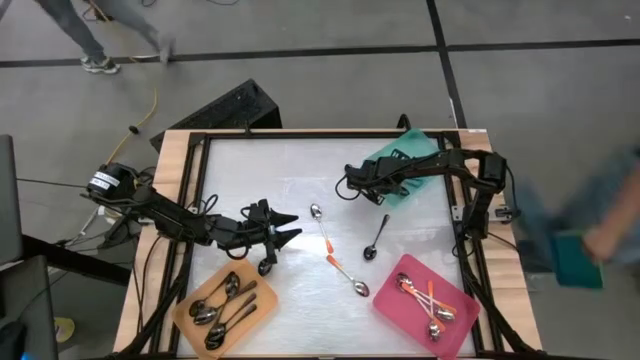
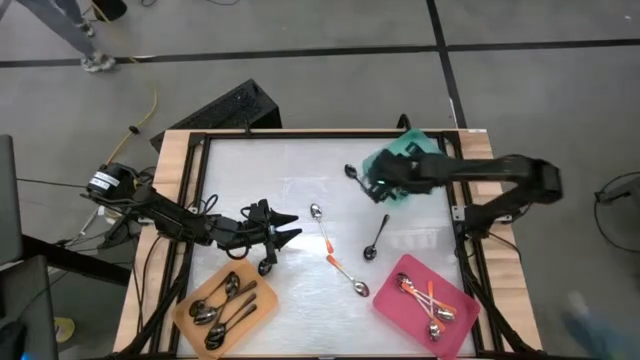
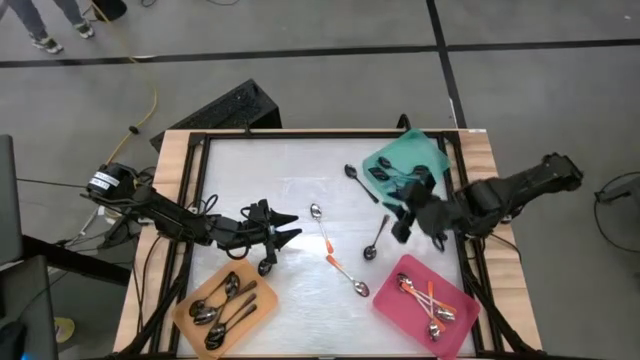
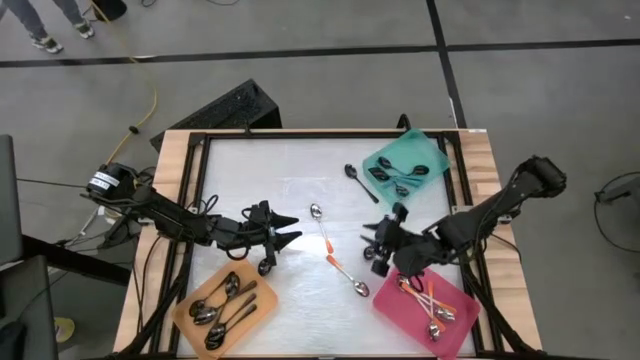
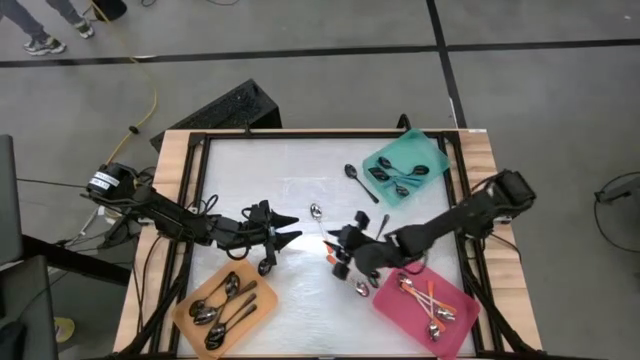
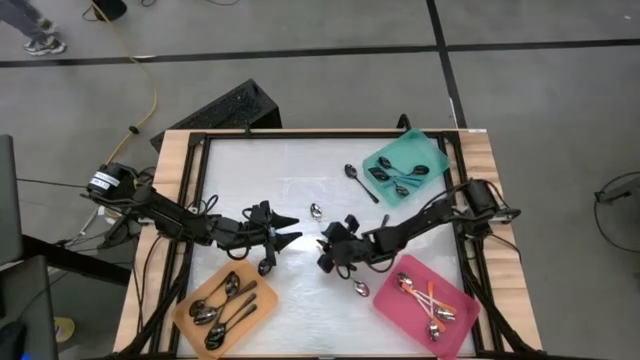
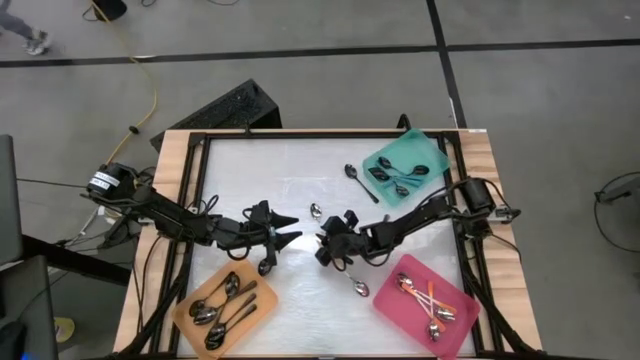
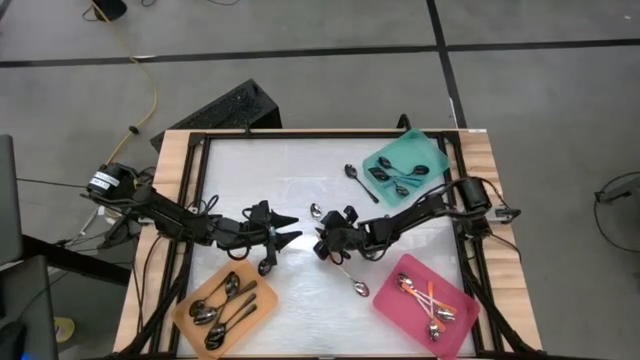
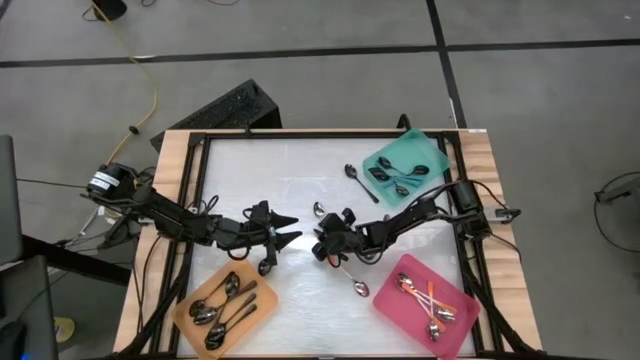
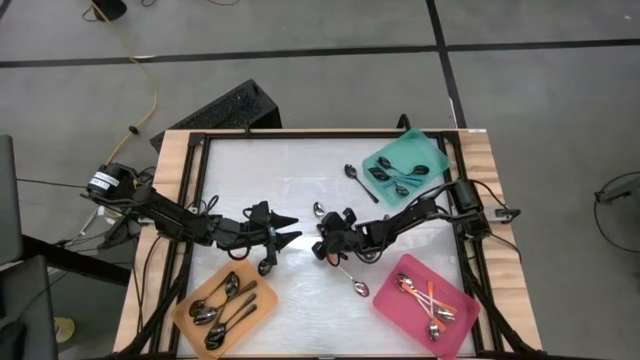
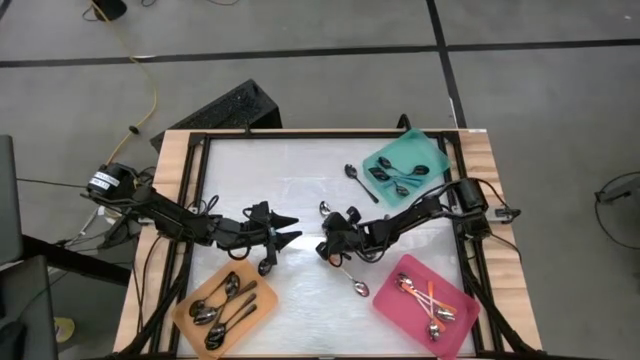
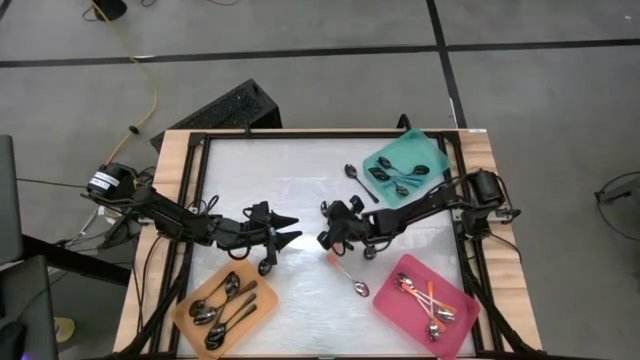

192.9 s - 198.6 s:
Task: Sort silverware by color (type)
Put the orange spoon into the red bin

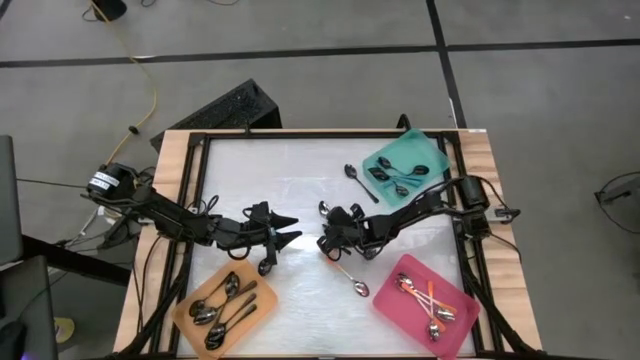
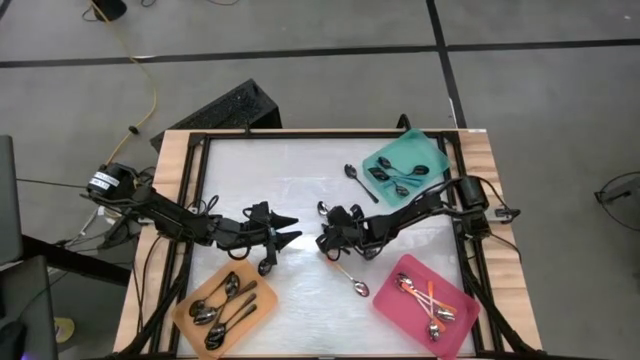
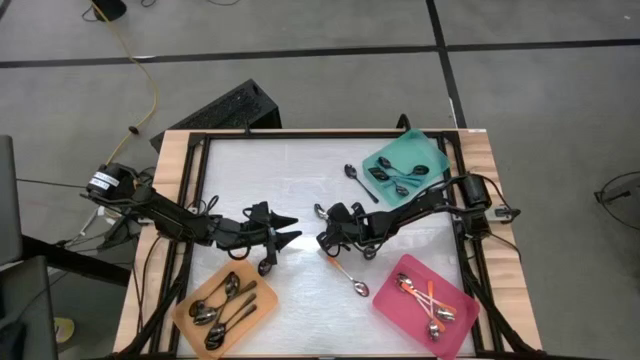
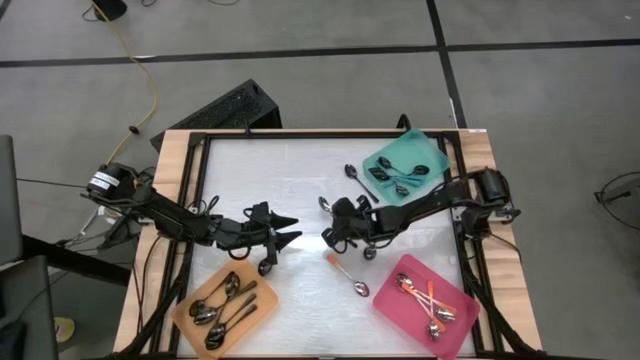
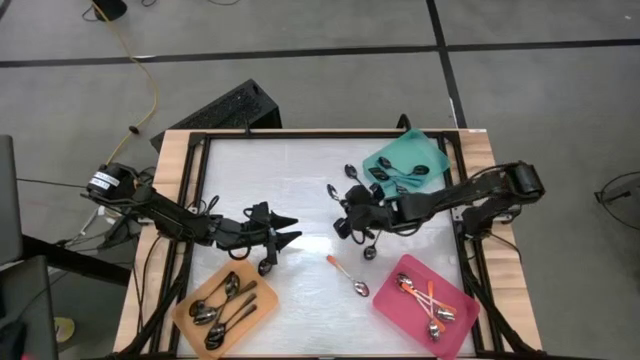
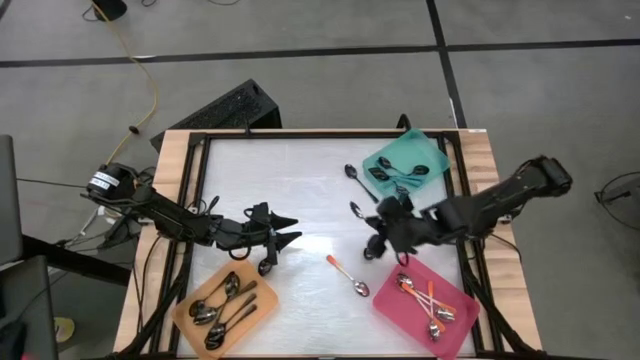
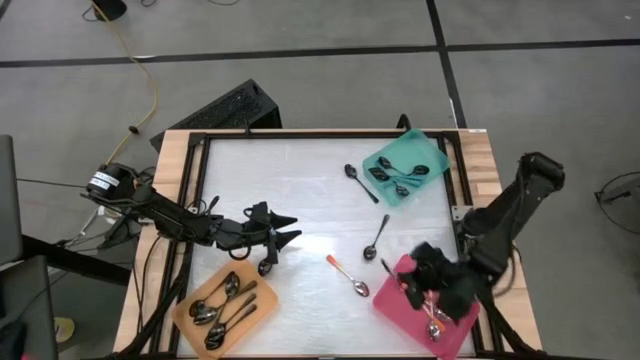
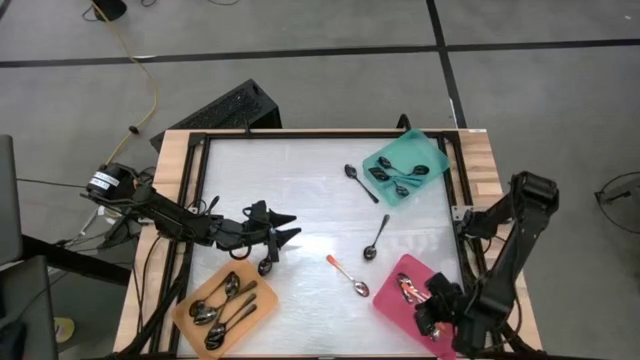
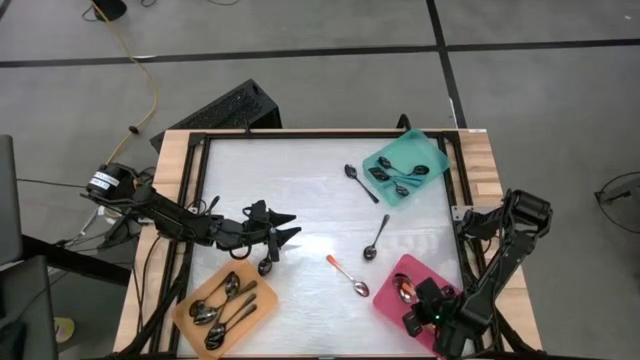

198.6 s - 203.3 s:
Put the orange spoon into the red bin

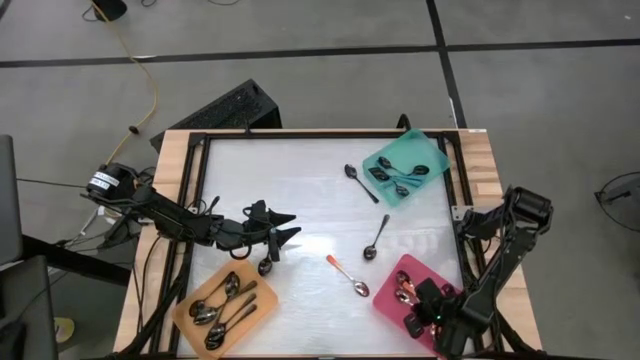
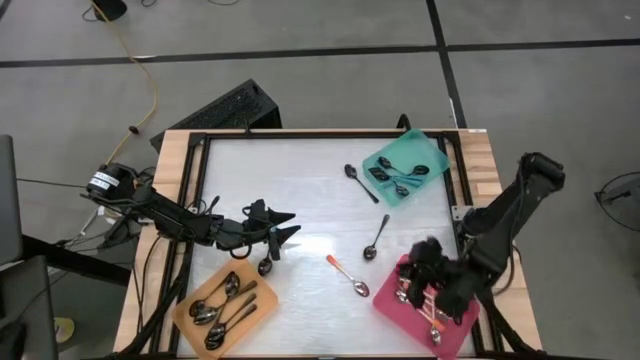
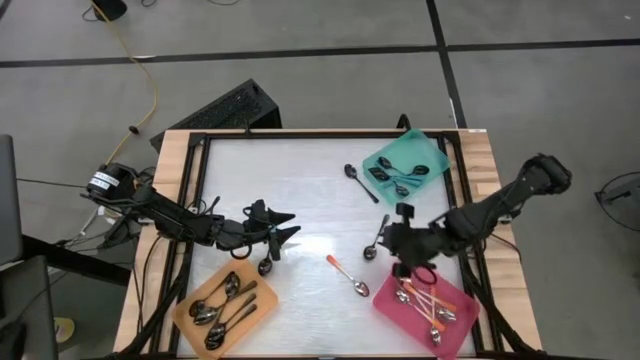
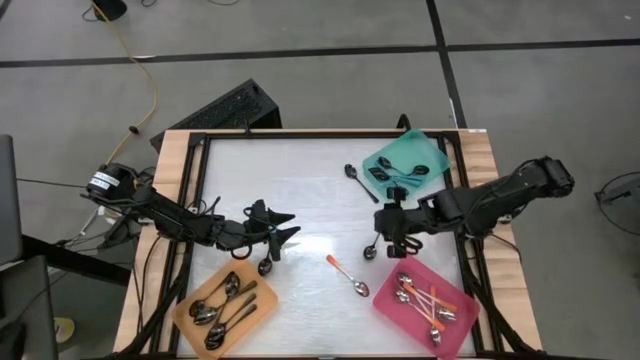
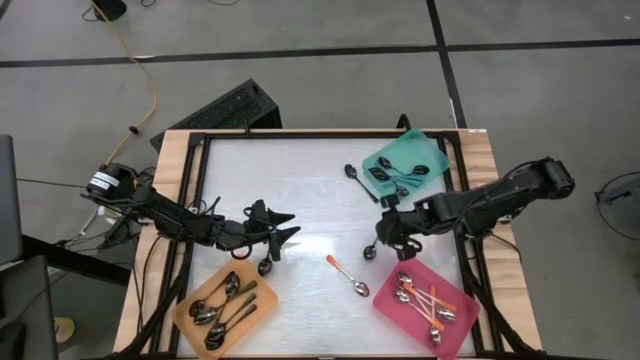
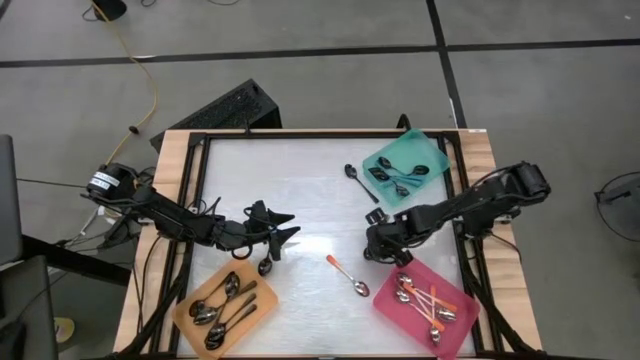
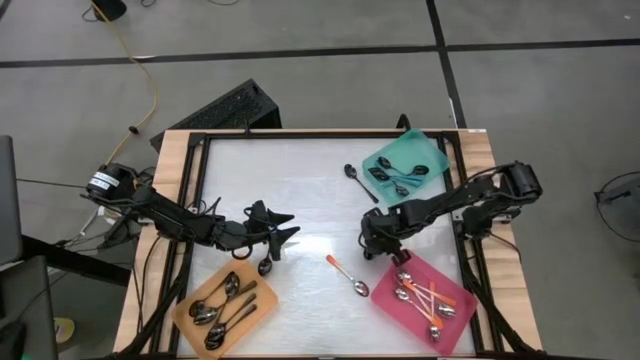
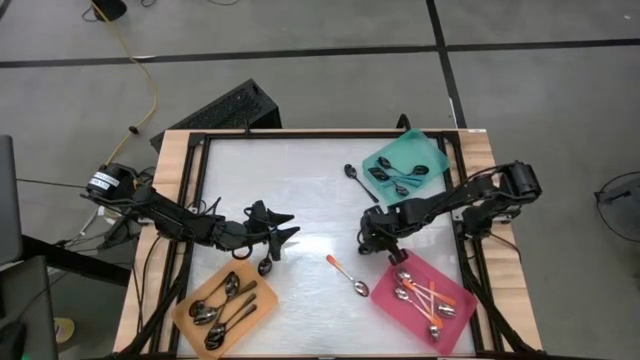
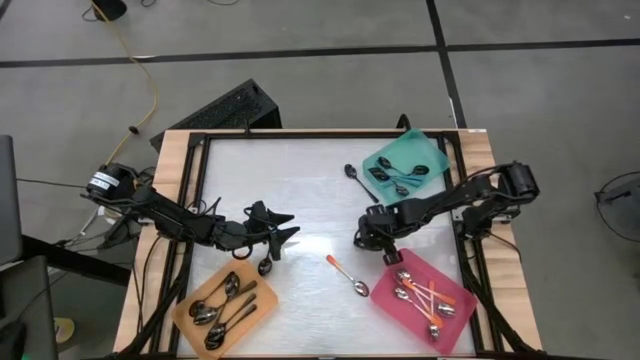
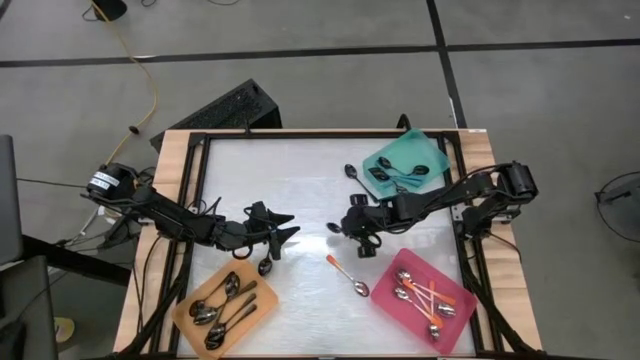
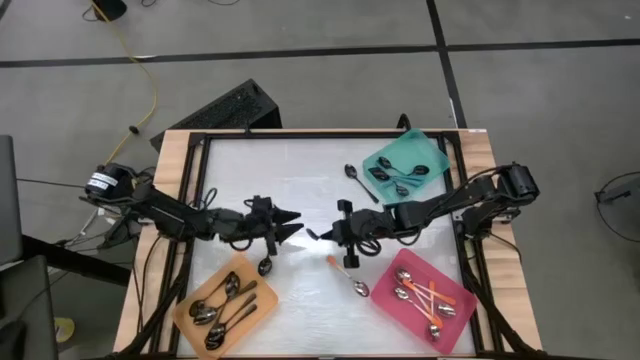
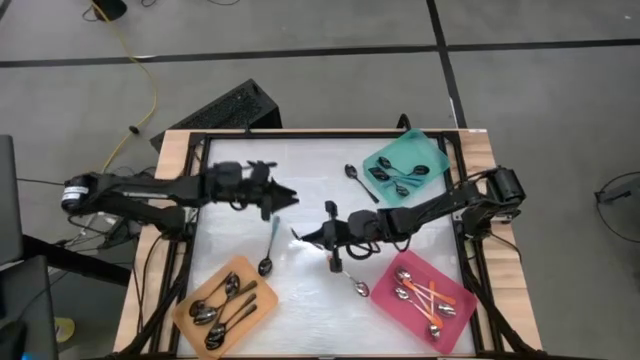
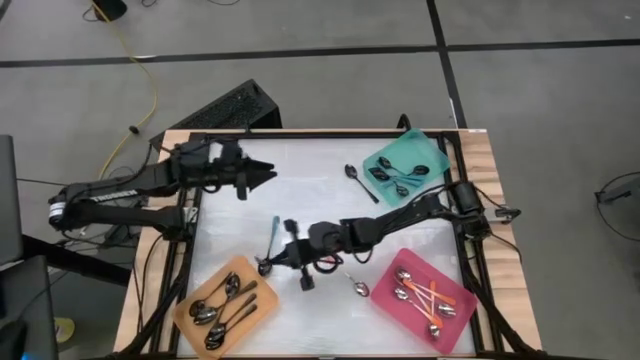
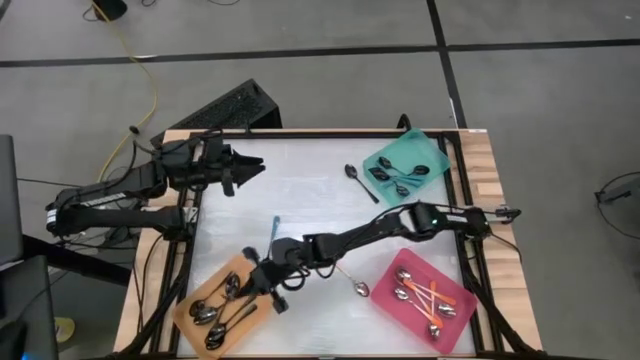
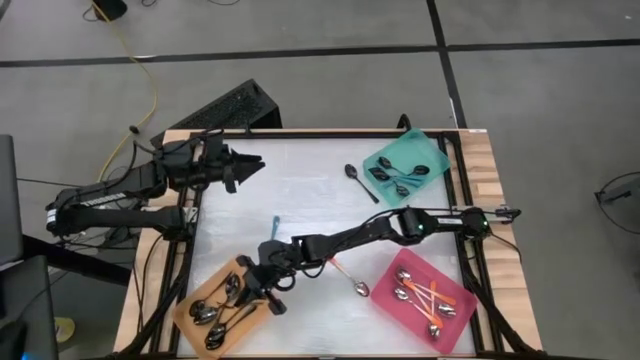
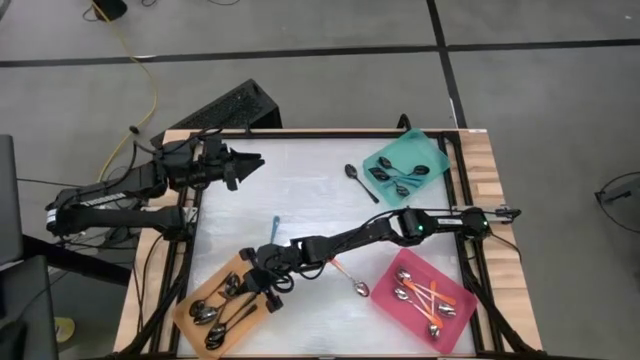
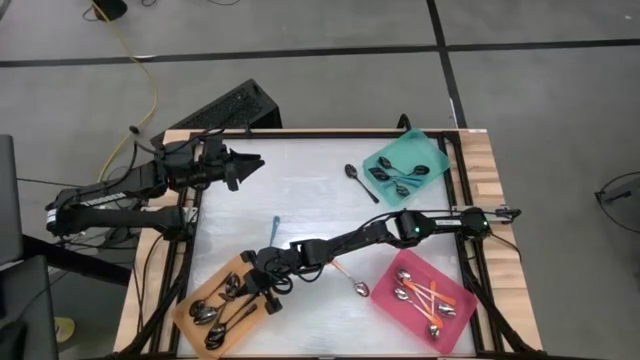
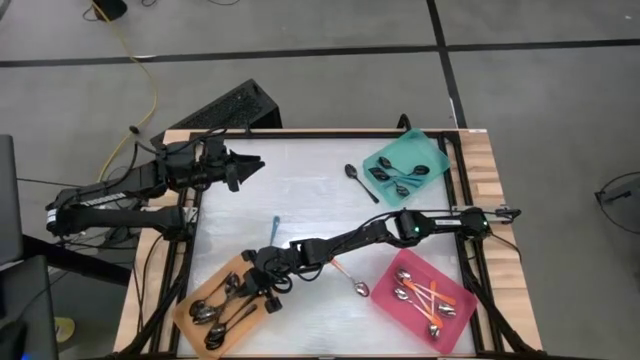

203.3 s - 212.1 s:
Put the black spoon into the orange bin

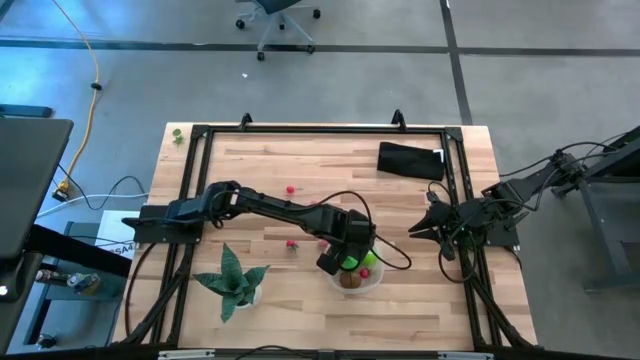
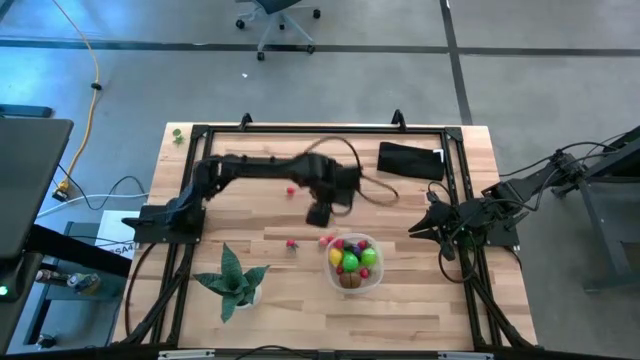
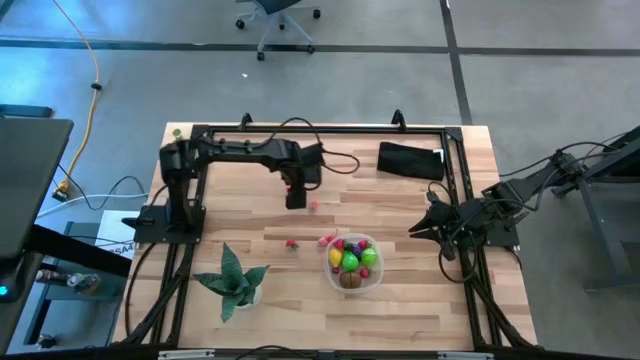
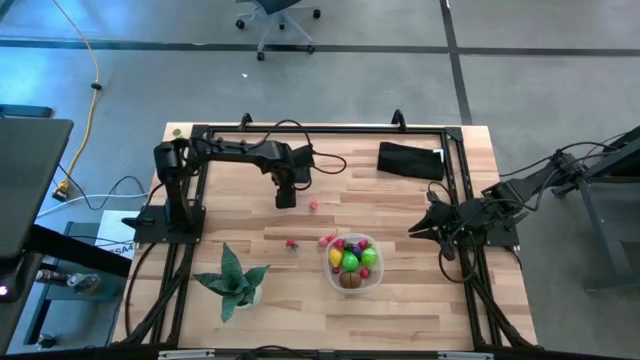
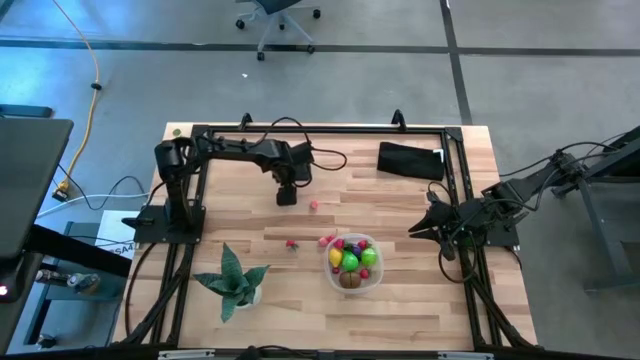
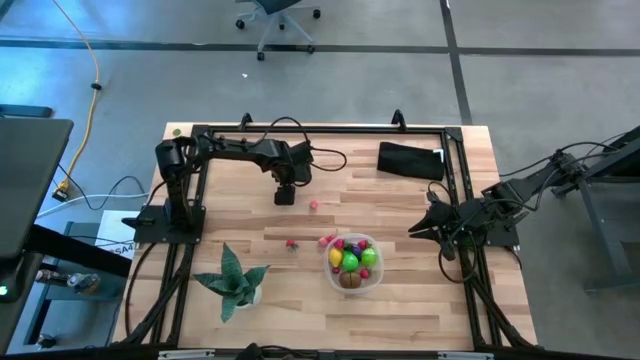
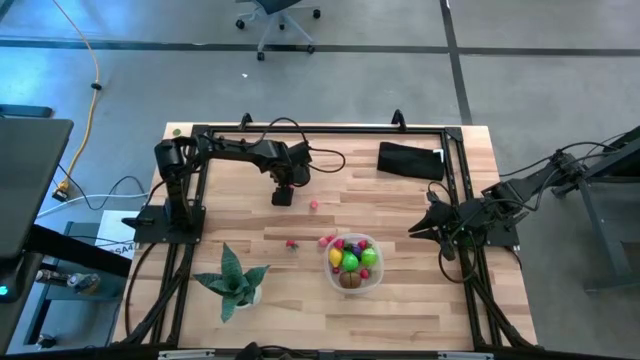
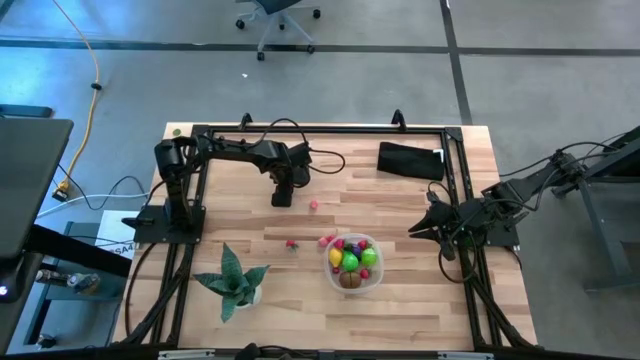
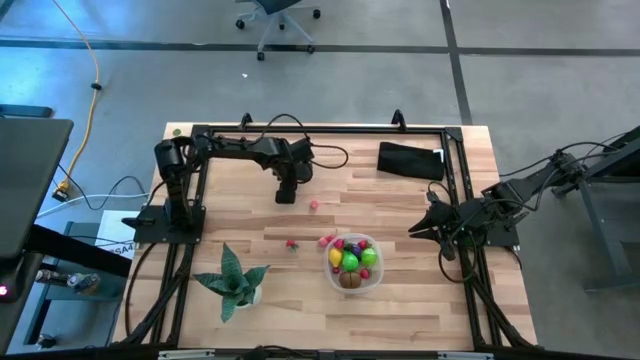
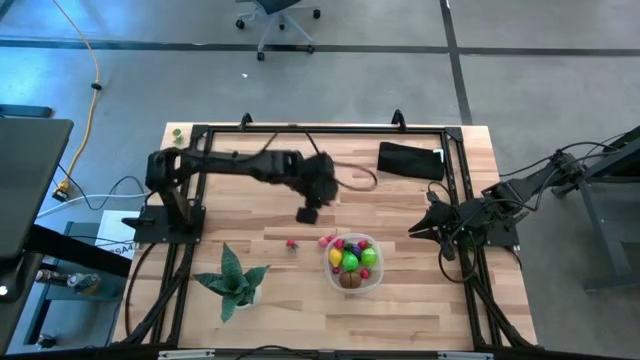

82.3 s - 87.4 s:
Task: Pick and placing Produce into tupperware
Put the top cherry into the transparent bin
